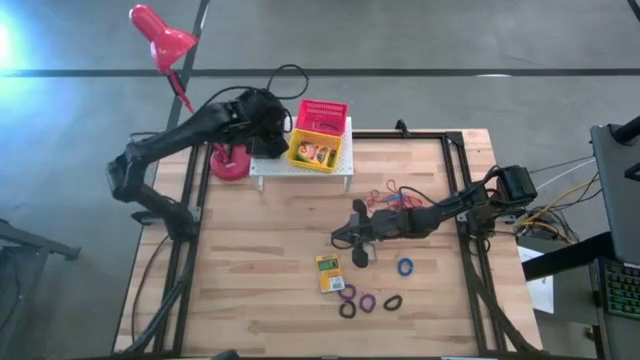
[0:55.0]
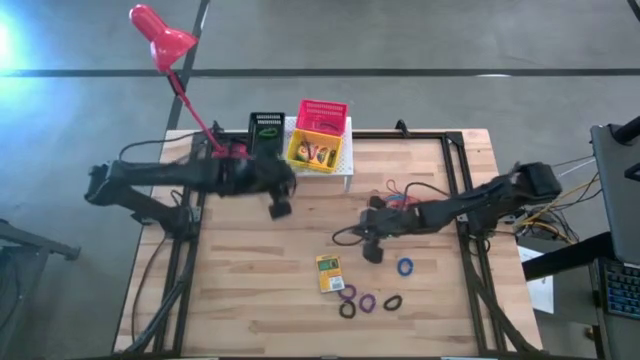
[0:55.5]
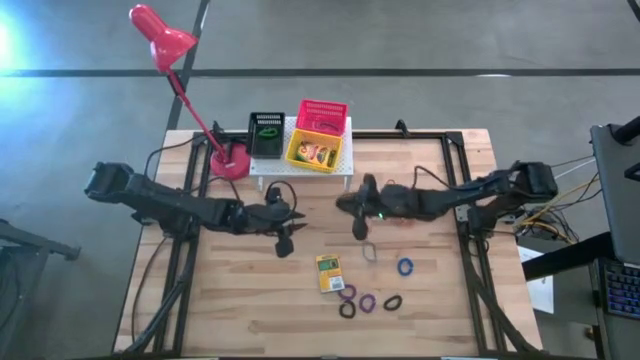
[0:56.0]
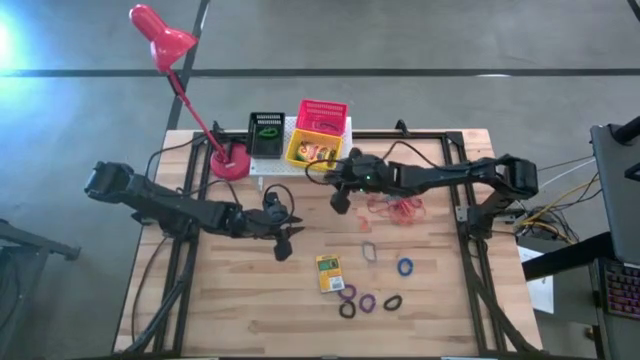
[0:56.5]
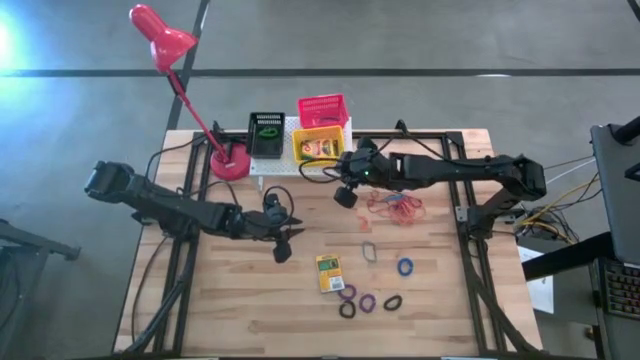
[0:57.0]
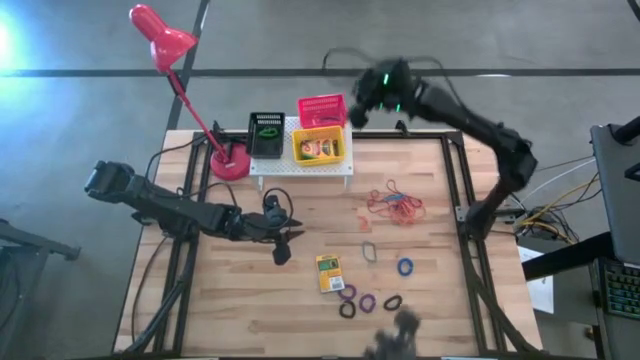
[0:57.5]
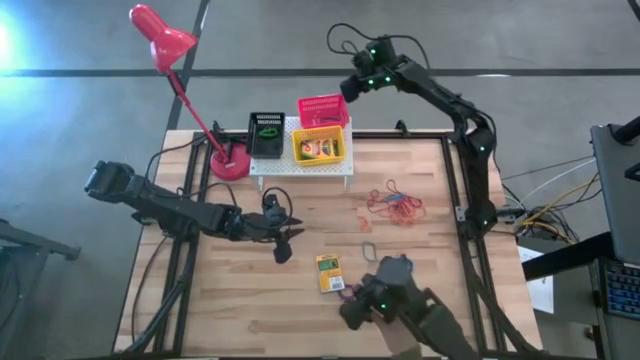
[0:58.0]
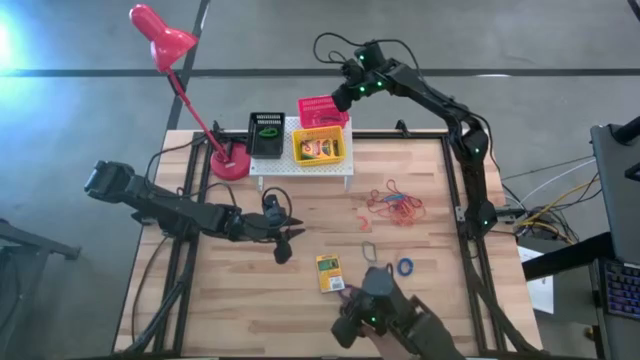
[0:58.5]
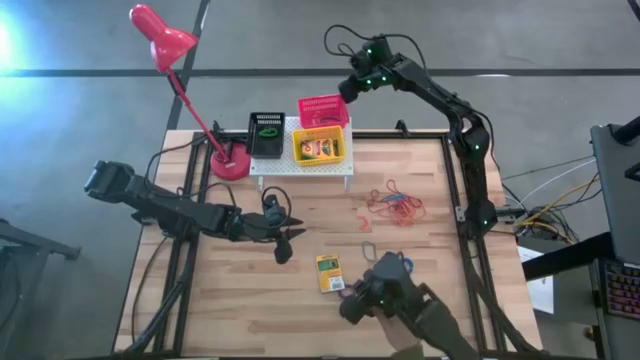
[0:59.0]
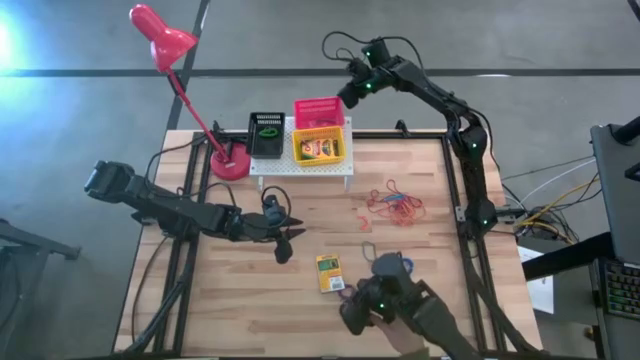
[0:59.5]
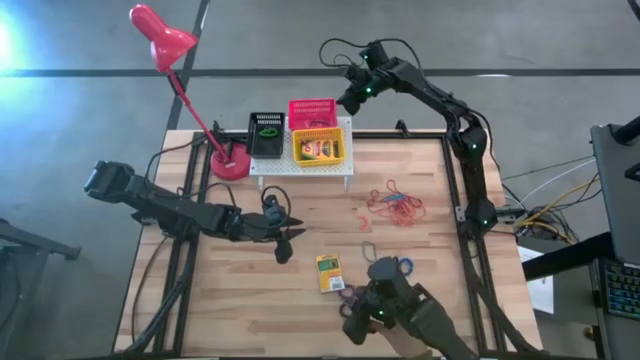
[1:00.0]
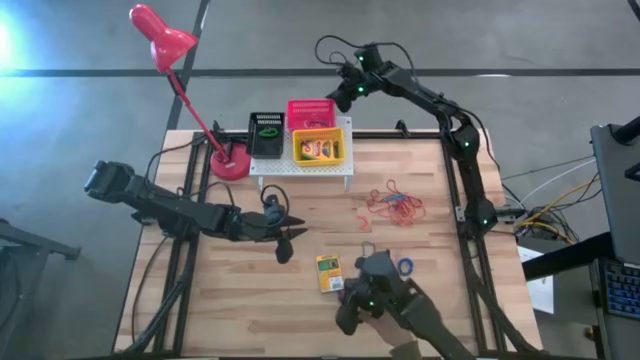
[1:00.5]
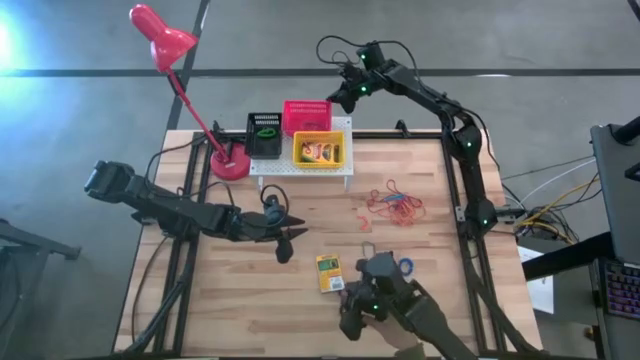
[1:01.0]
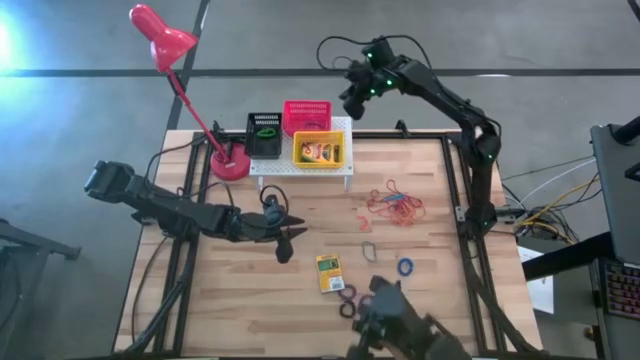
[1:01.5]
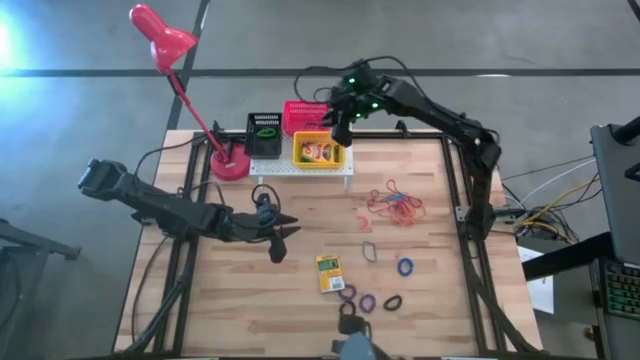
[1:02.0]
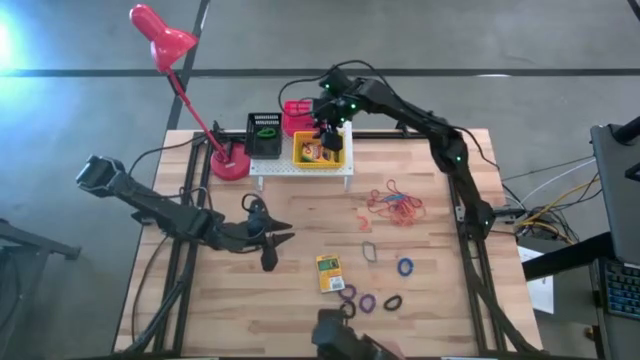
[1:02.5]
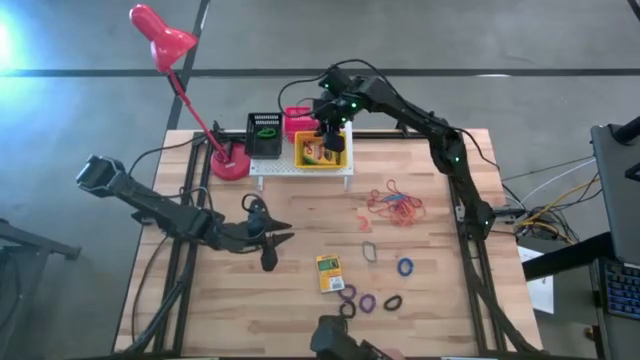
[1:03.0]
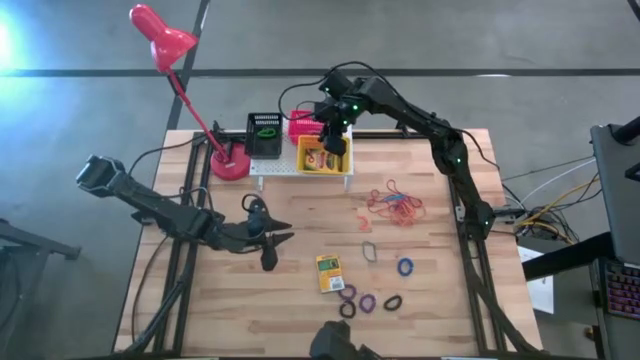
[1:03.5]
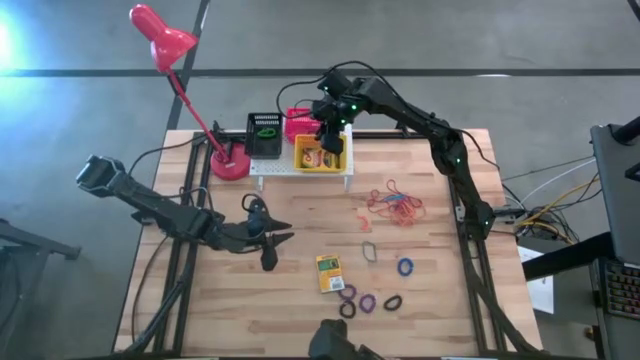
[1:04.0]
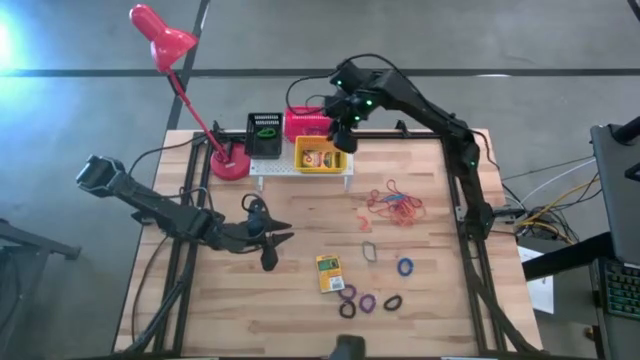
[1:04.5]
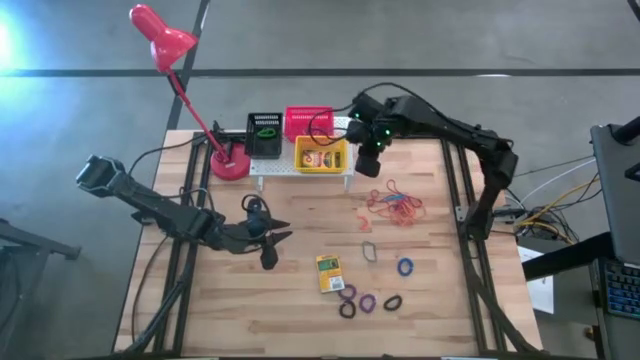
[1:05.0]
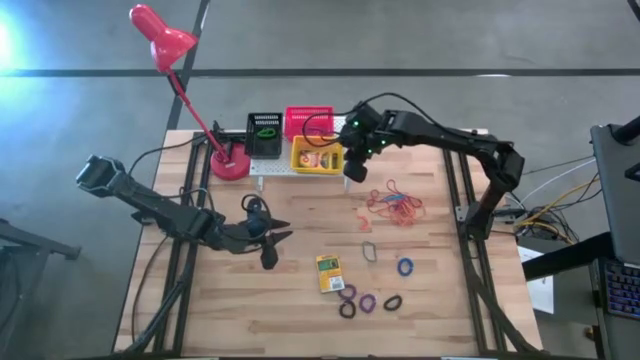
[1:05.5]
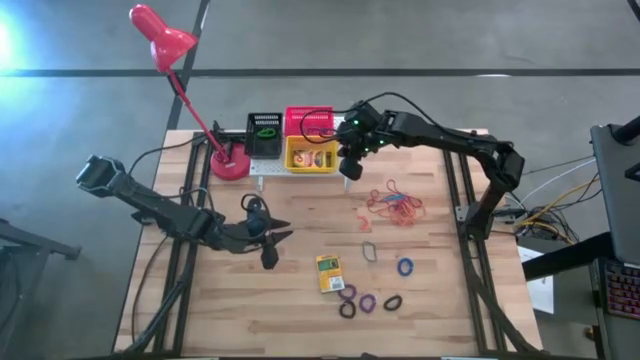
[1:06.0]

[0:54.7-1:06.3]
Task: Pick & Place Office Desk Supplies
Adjust the bins on the shelf

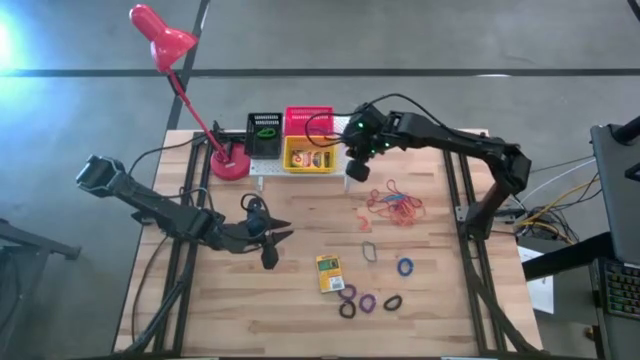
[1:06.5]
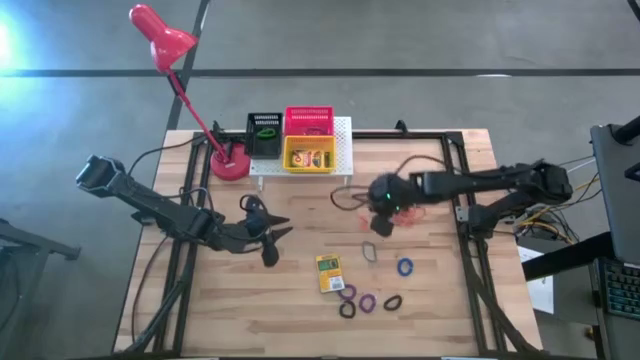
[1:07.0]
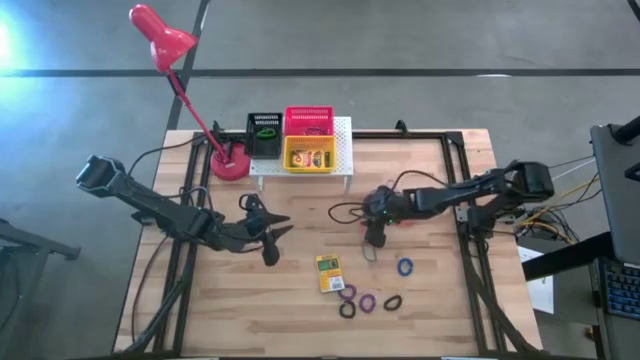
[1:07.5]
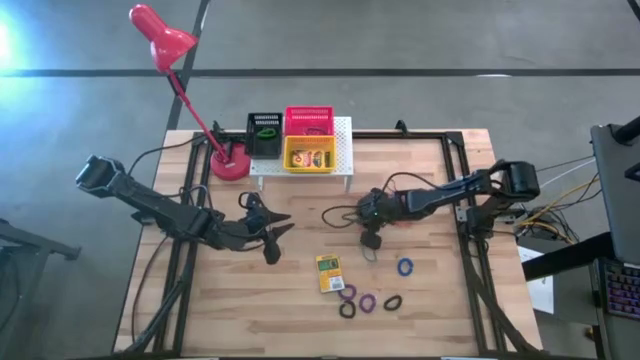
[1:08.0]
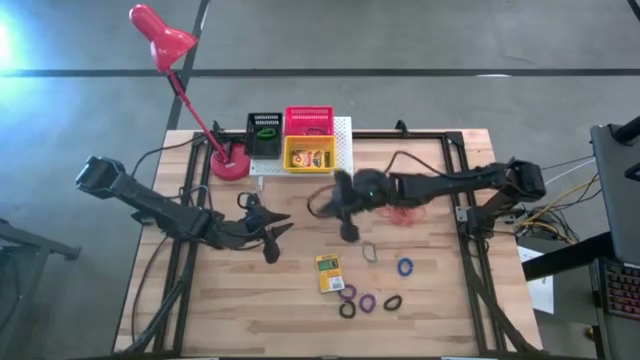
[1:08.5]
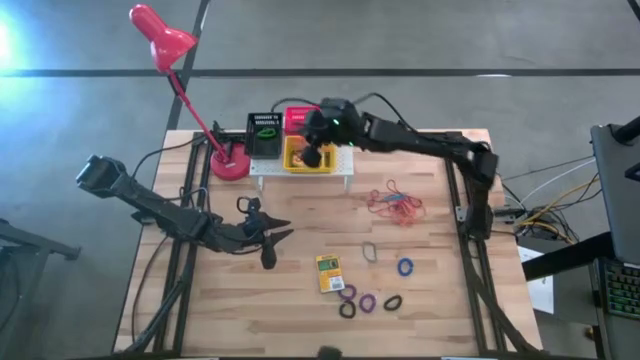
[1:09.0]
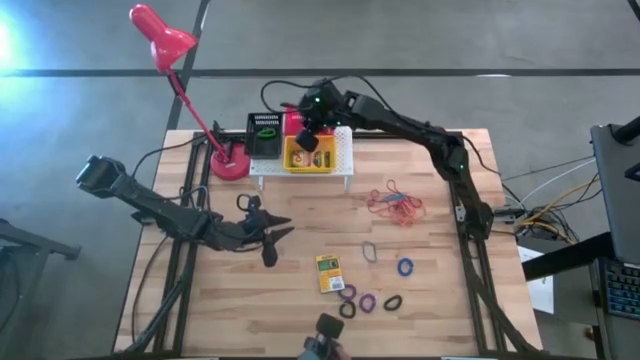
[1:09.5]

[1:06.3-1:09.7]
Put the orange rubber band into the red bin on the shelf on the shelf

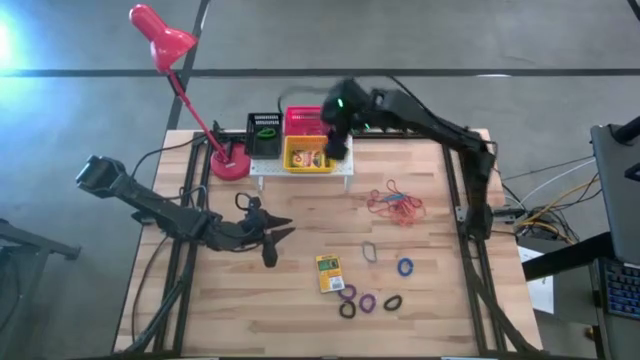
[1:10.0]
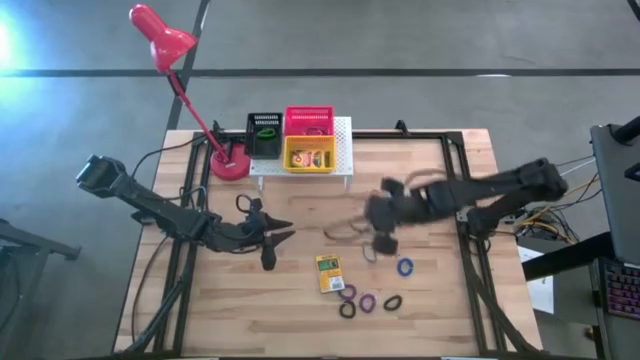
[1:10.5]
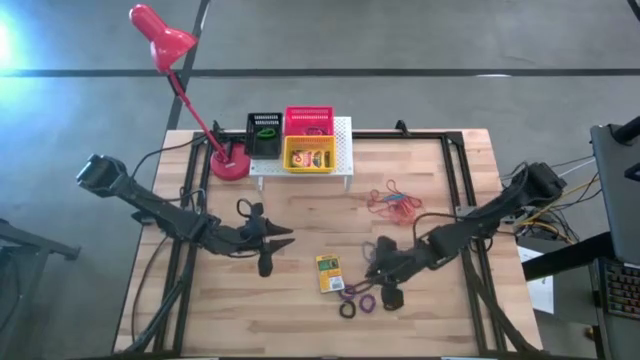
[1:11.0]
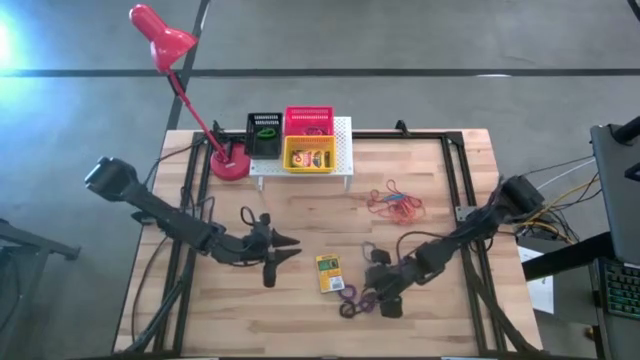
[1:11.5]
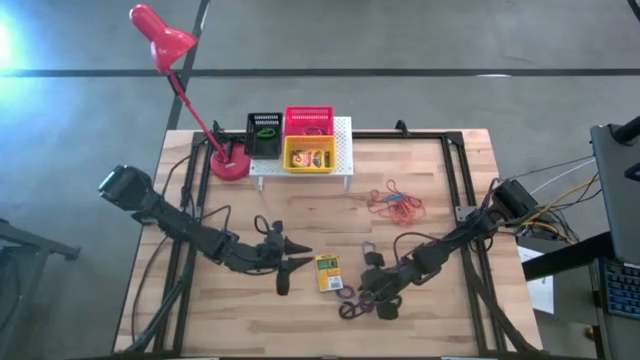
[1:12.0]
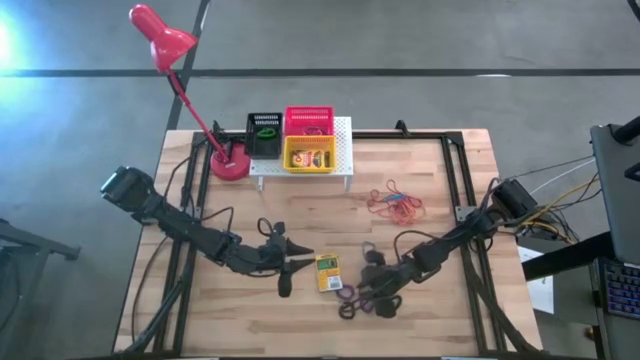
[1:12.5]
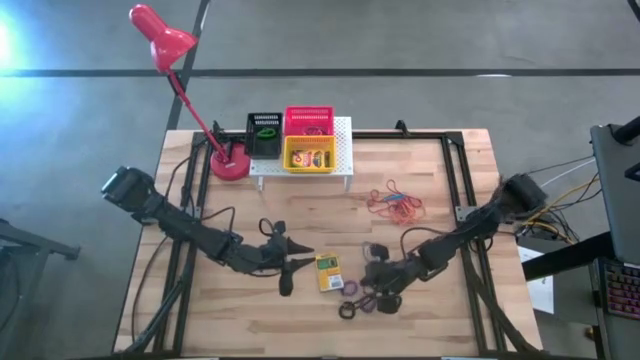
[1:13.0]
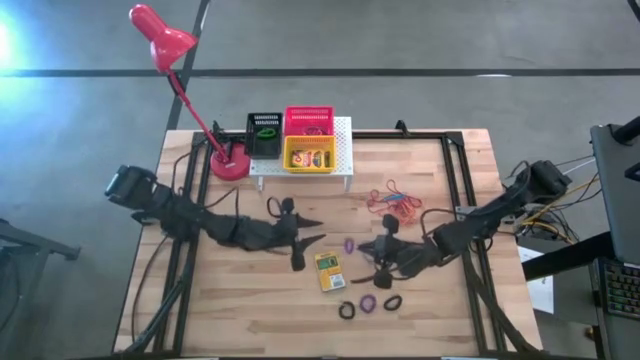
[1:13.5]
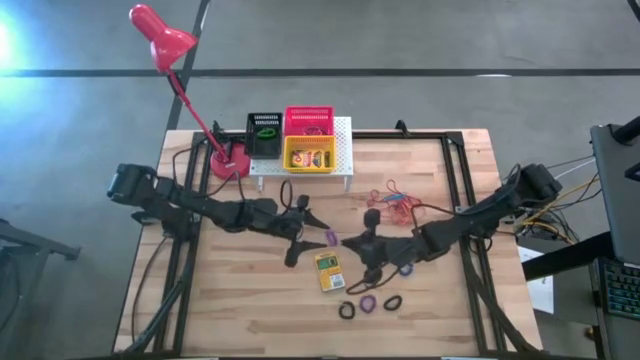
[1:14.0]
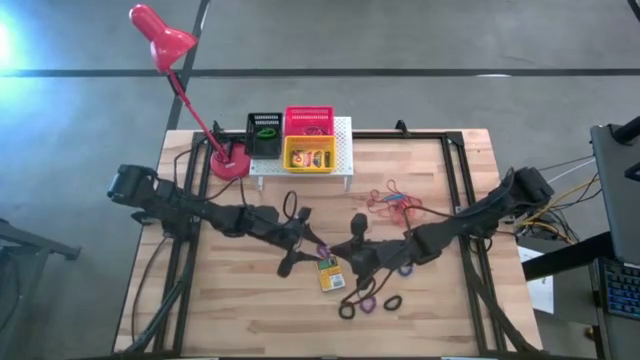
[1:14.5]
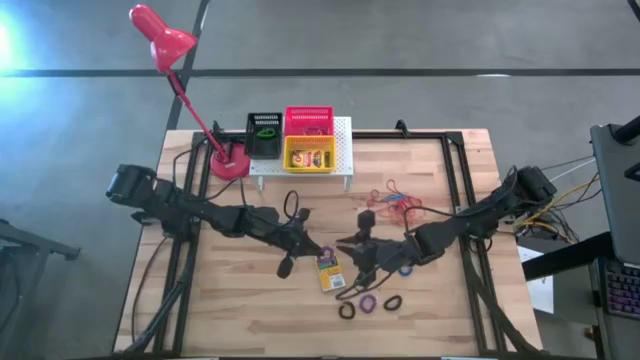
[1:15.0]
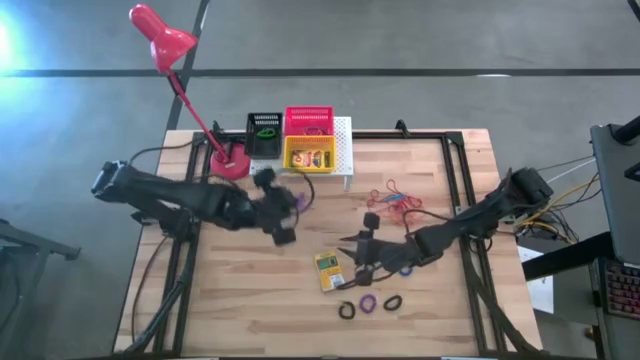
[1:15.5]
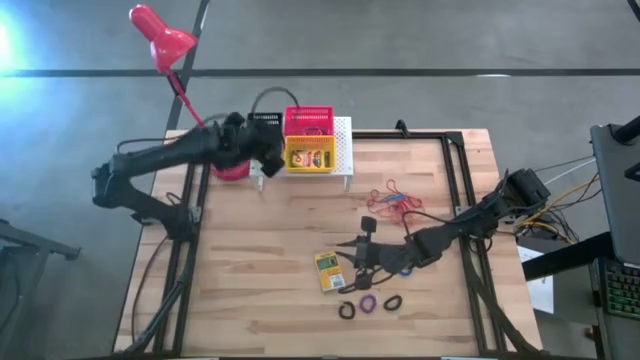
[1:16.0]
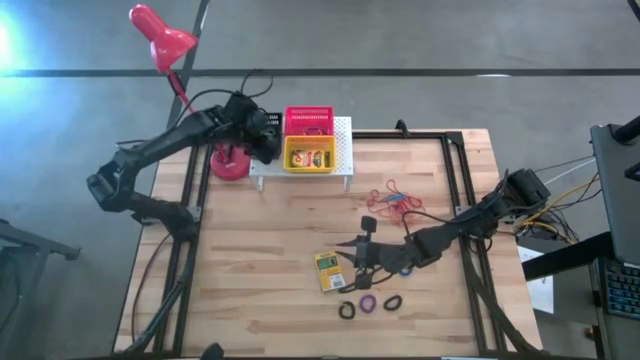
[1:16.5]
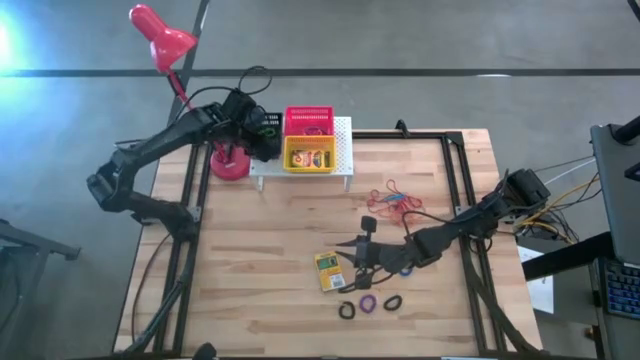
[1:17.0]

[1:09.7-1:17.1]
Put the left purple spring keychain into the black bin on the shelf
